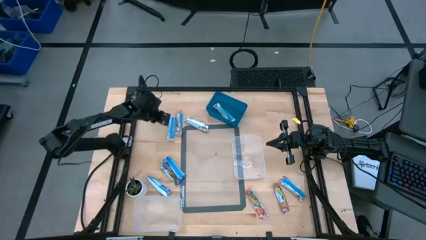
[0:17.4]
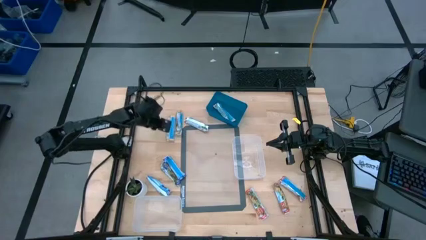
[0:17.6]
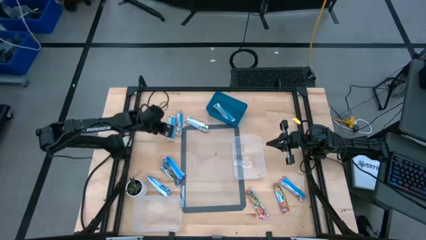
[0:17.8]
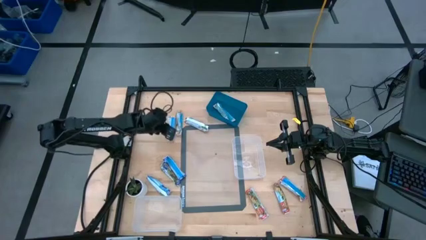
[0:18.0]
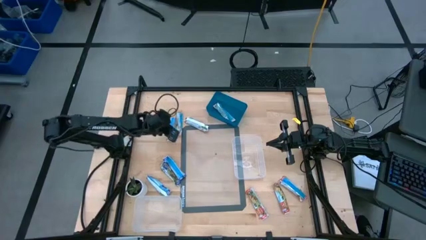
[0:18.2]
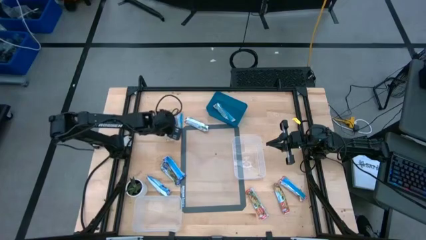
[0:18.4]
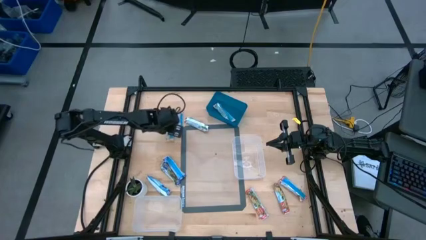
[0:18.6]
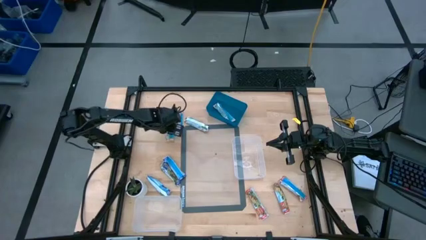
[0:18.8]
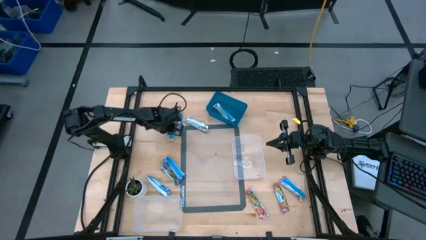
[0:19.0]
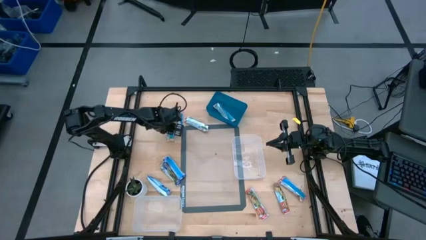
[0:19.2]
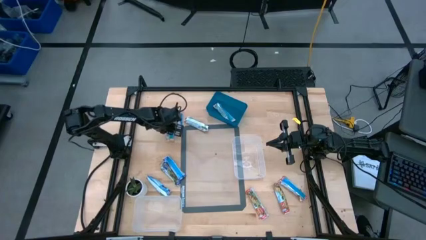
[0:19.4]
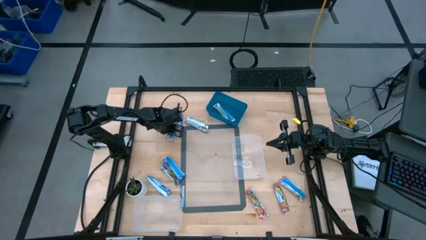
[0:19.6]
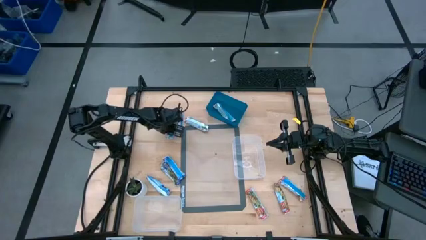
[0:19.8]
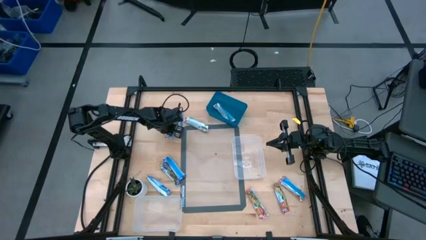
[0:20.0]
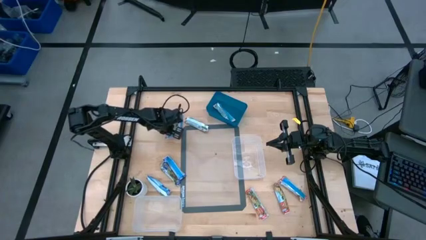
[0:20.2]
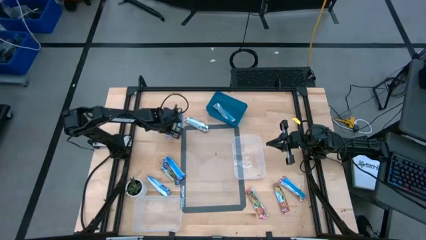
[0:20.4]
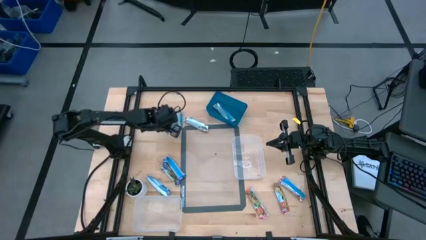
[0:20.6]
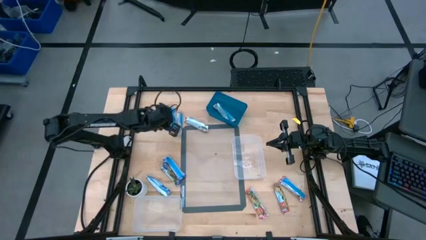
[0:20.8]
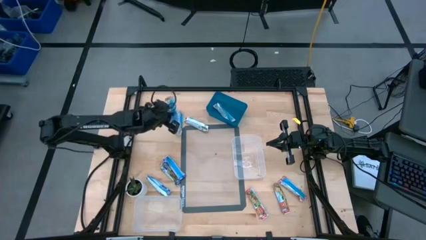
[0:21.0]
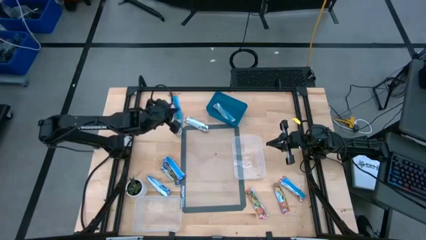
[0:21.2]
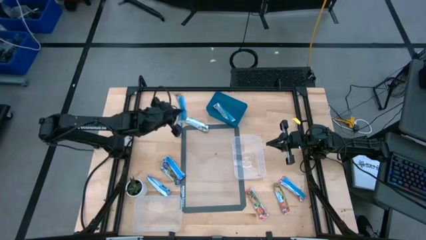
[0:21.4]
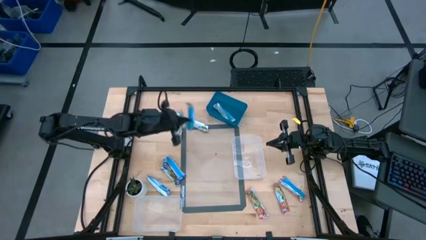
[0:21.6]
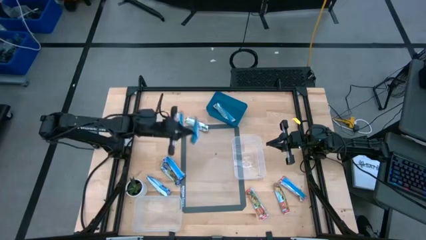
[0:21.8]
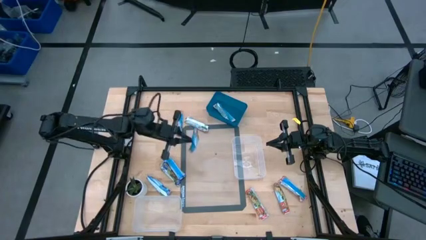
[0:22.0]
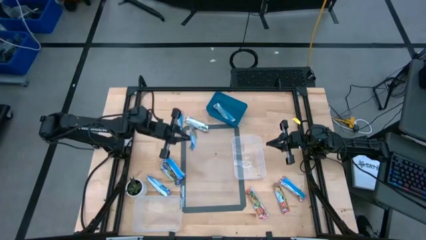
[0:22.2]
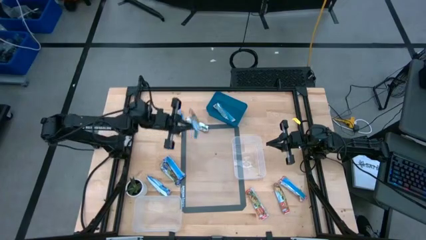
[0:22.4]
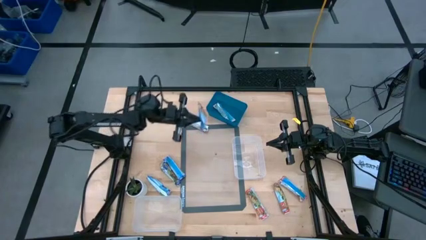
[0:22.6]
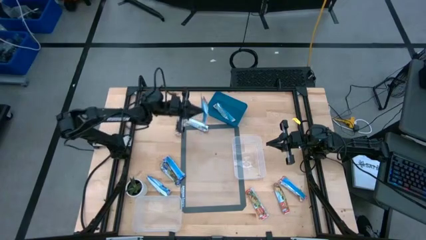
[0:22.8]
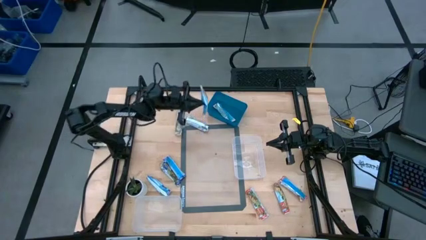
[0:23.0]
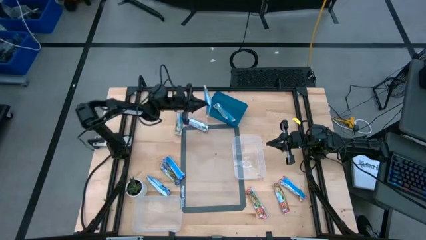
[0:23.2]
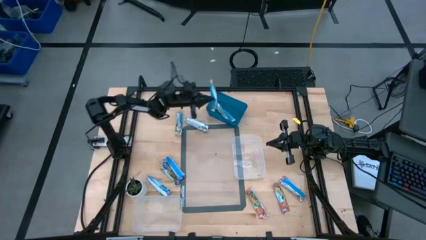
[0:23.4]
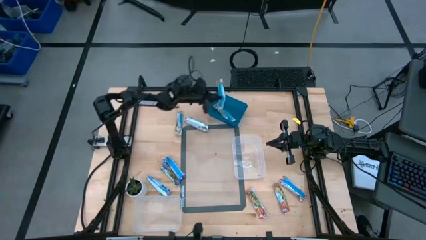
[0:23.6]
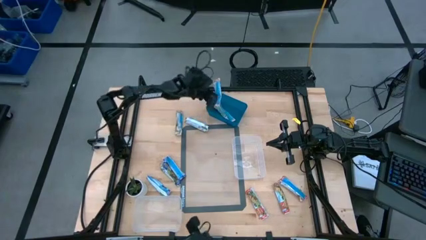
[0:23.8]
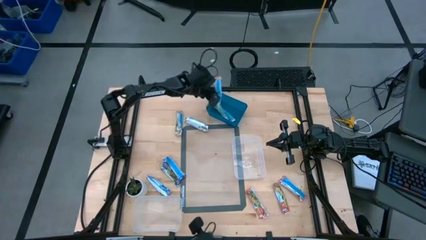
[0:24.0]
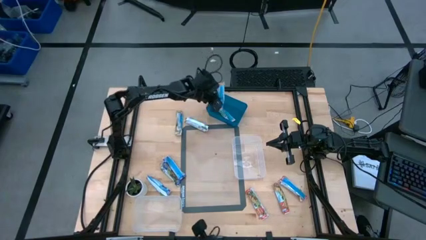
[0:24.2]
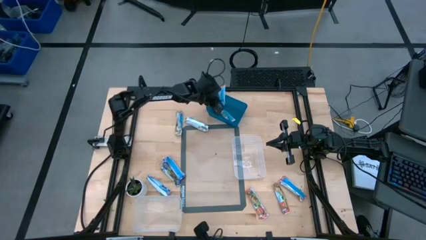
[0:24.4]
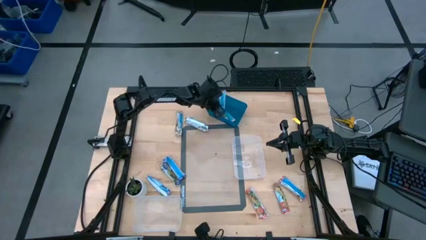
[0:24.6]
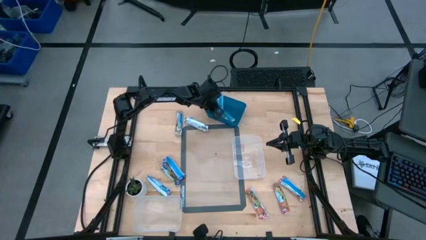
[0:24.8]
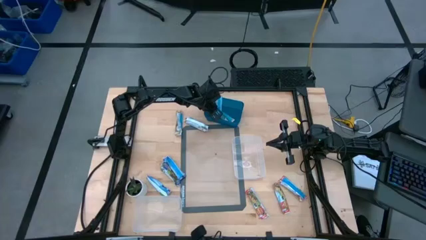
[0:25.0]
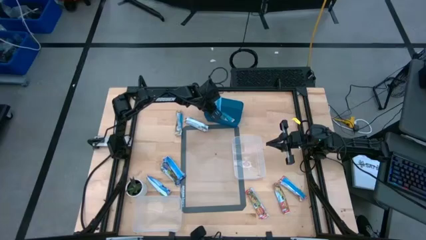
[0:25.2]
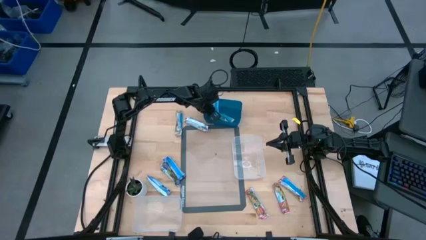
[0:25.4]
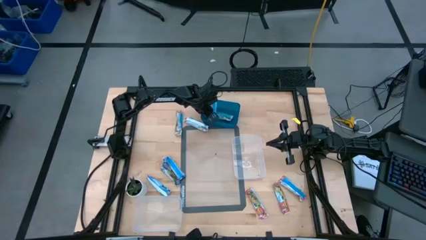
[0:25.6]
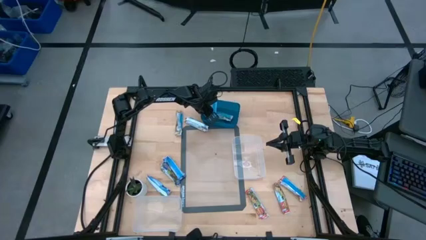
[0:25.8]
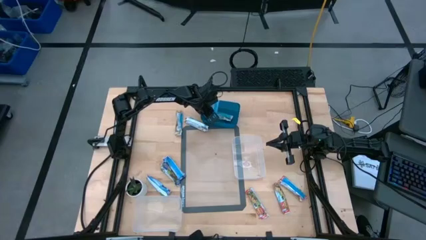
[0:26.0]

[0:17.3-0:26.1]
Task: Pick and place Granola Bars by type
Put the orange granola bar into the blue bin

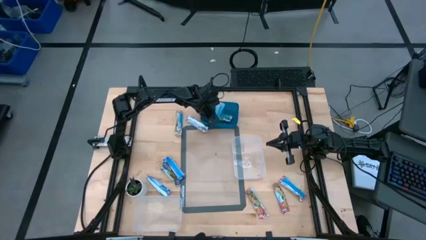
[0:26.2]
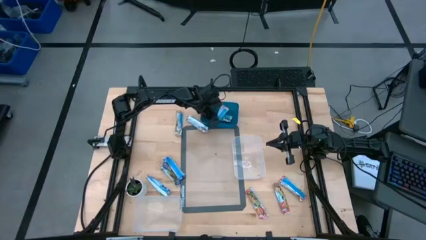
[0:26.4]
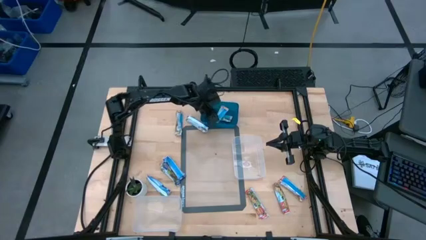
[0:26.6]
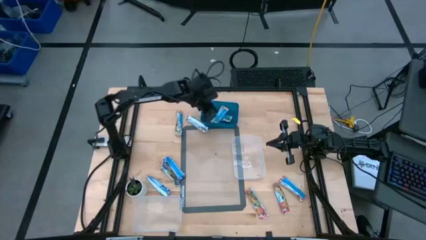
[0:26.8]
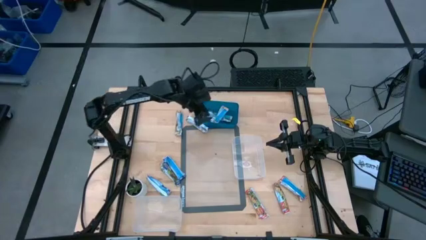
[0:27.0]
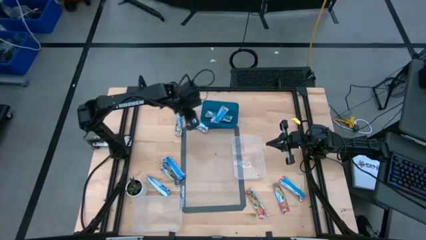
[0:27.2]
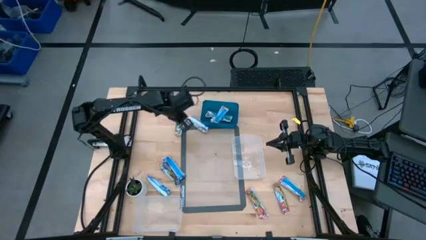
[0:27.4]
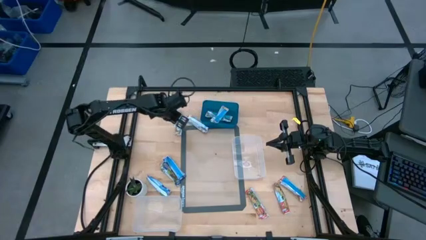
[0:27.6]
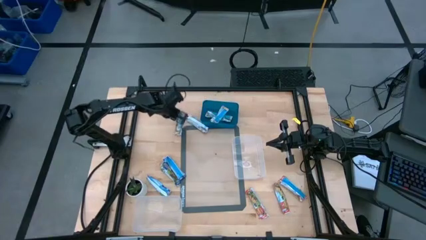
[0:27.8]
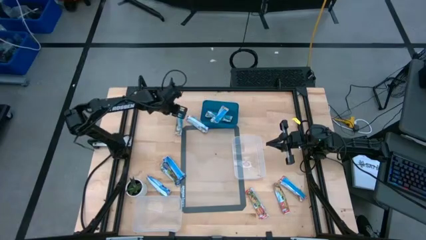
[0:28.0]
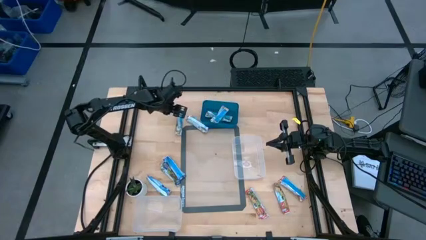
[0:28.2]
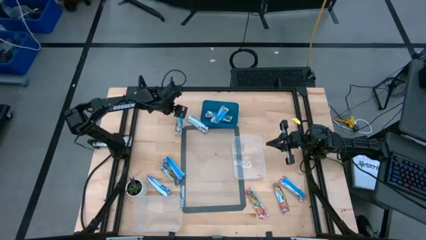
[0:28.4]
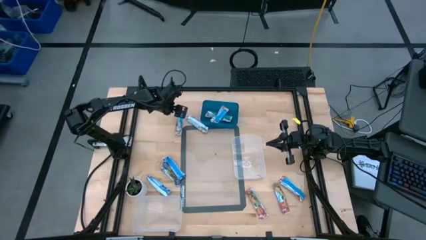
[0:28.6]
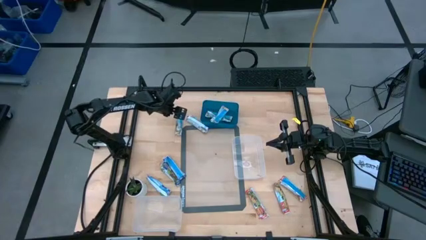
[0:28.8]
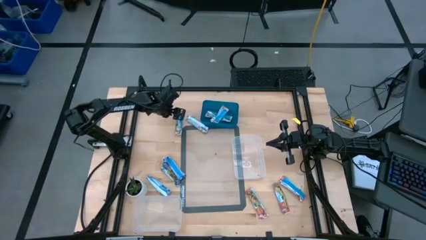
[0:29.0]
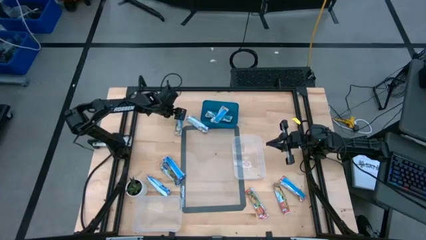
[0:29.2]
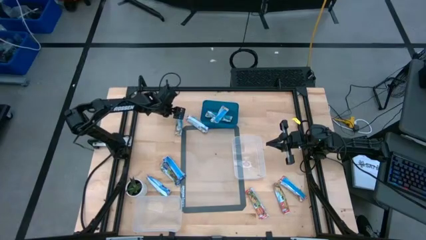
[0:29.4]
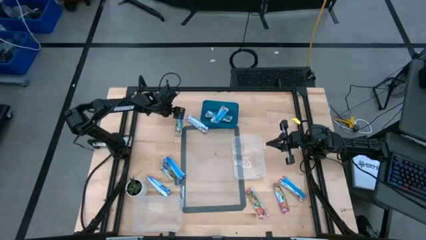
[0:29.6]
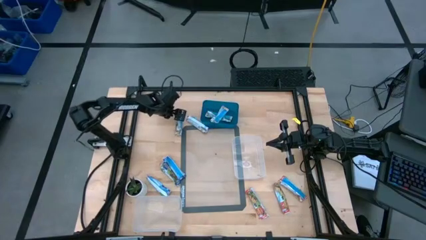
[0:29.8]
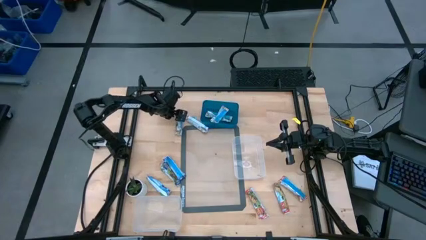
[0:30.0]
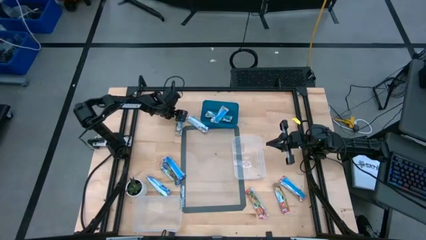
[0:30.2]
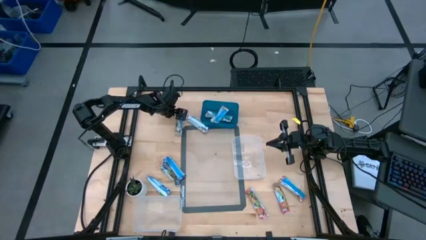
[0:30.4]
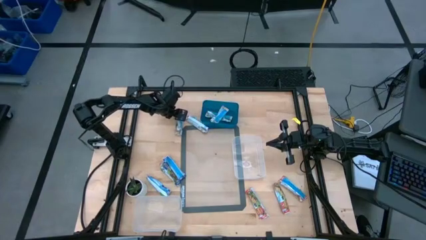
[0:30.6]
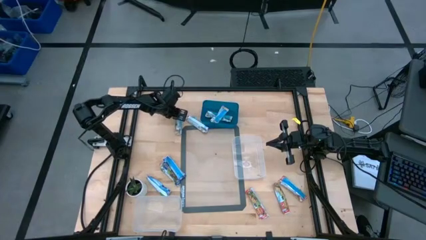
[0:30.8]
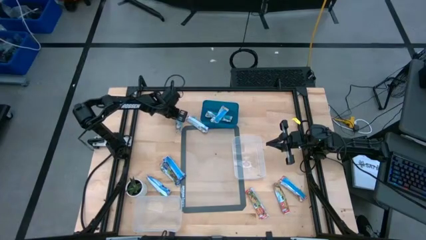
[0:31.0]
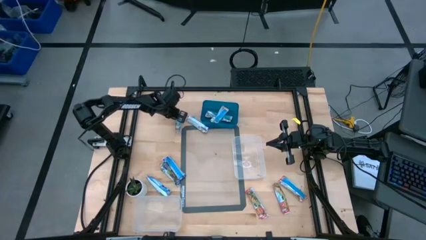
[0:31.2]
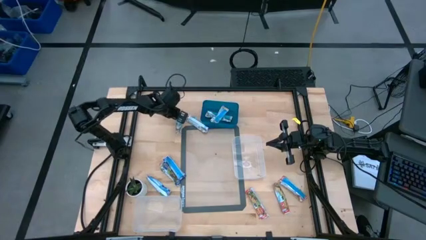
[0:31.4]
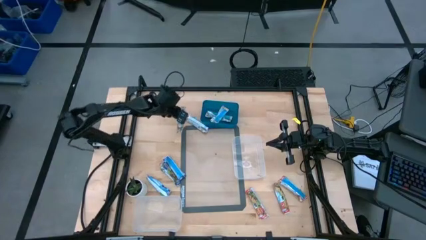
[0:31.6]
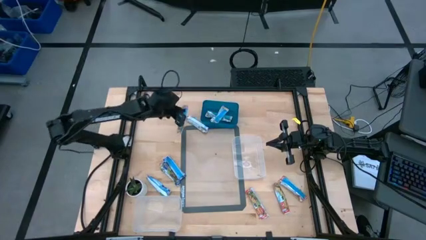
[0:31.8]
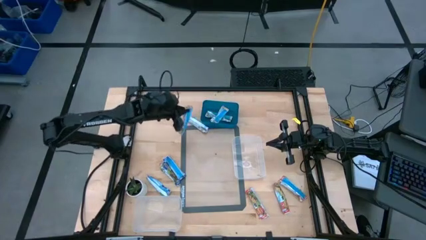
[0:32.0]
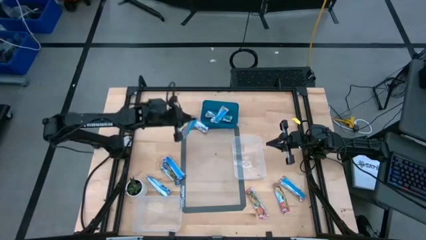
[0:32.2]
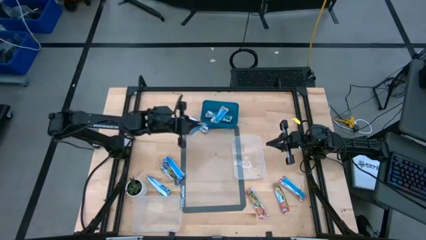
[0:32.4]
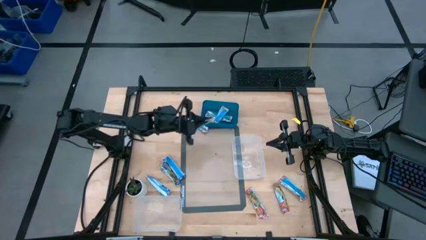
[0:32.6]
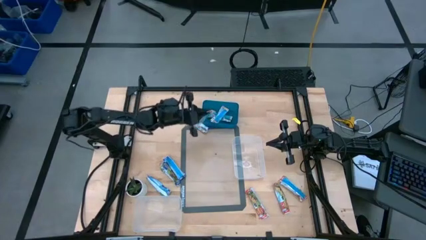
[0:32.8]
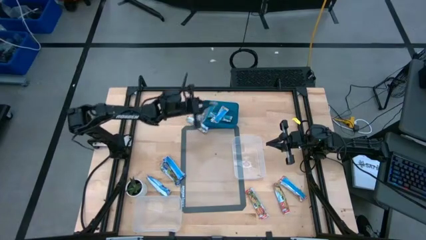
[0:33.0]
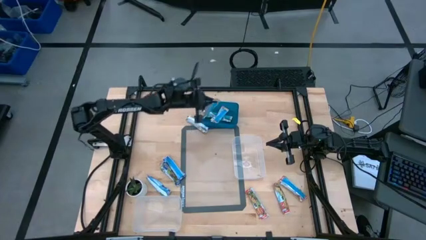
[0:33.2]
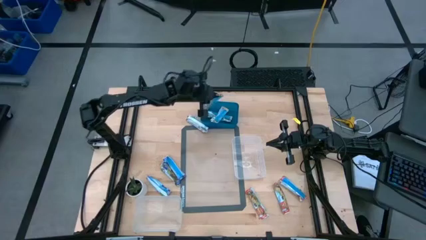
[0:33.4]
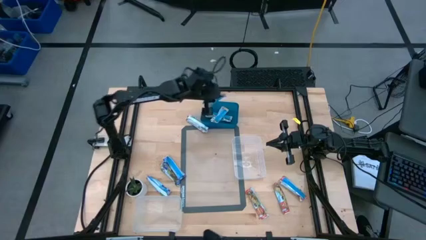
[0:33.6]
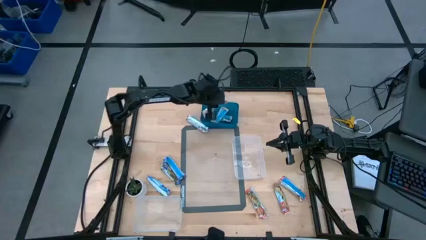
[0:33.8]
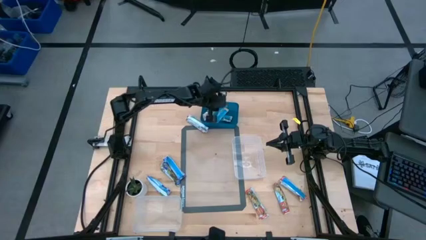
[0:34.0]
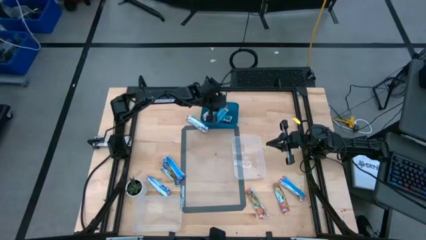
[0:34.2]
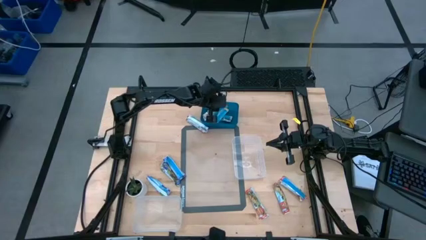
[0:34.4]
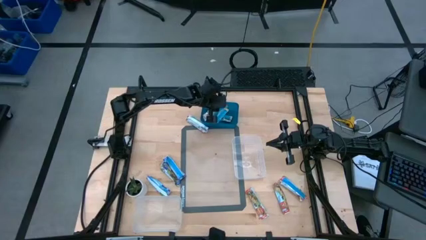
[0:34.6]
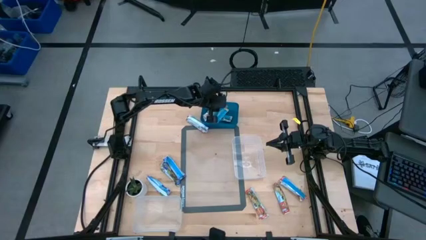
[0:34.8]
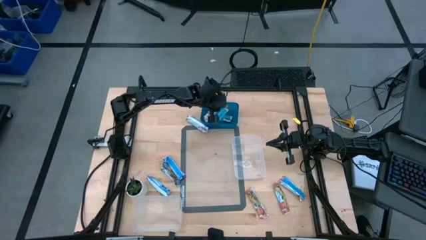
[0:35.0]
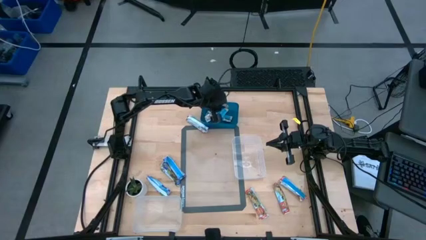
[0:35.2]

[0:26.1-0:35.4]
Put the orange granola bar into the blue bin
